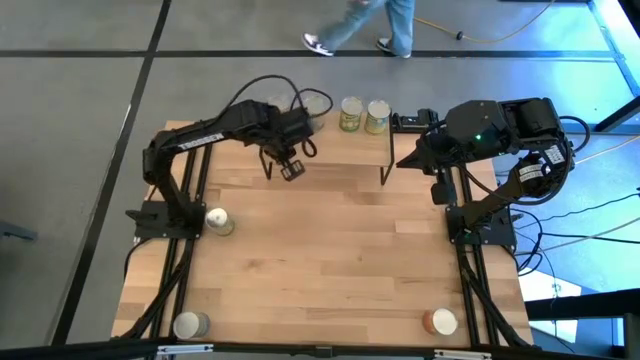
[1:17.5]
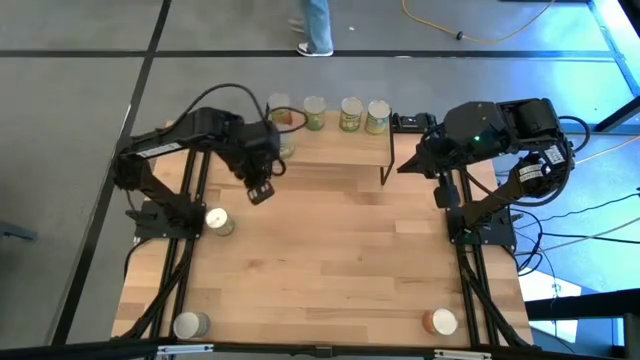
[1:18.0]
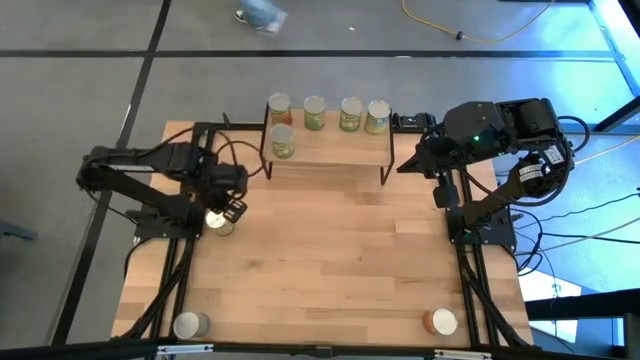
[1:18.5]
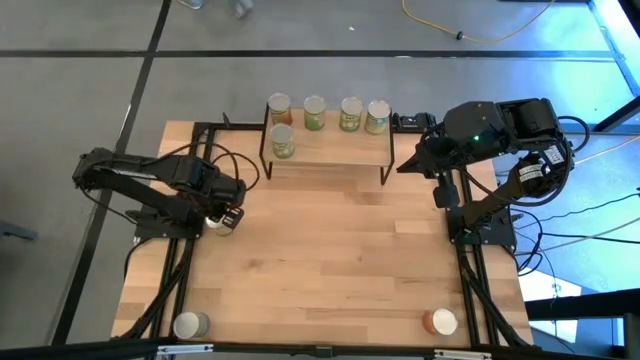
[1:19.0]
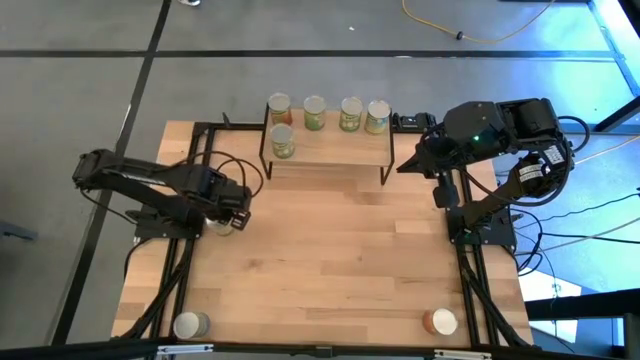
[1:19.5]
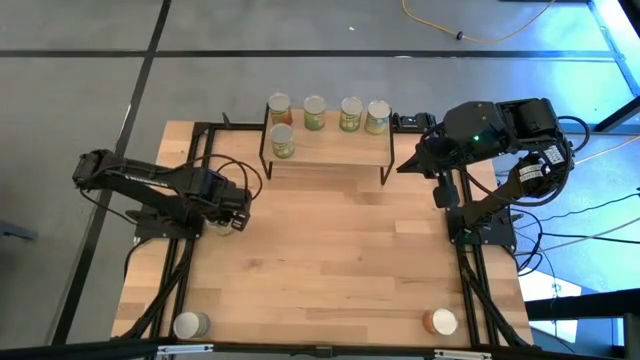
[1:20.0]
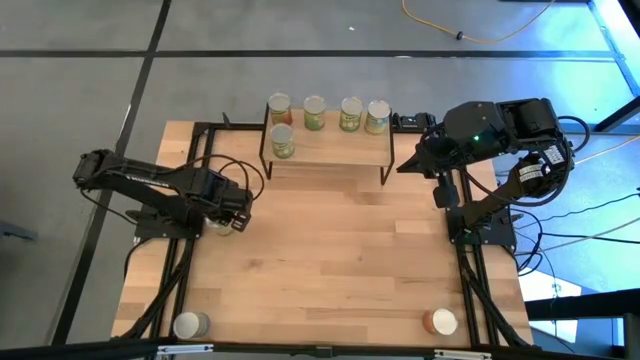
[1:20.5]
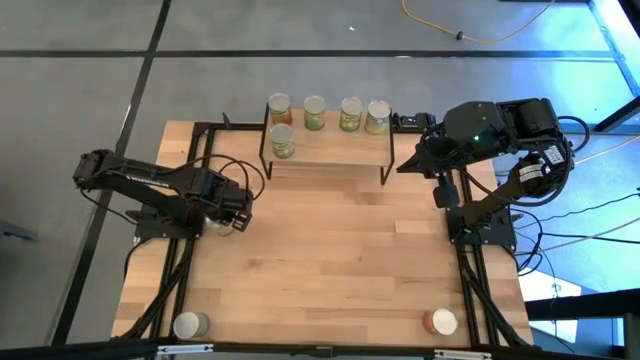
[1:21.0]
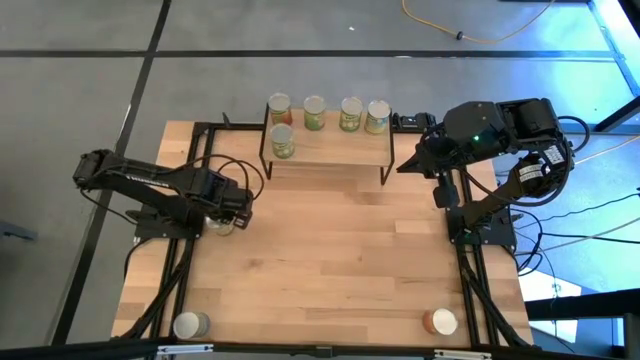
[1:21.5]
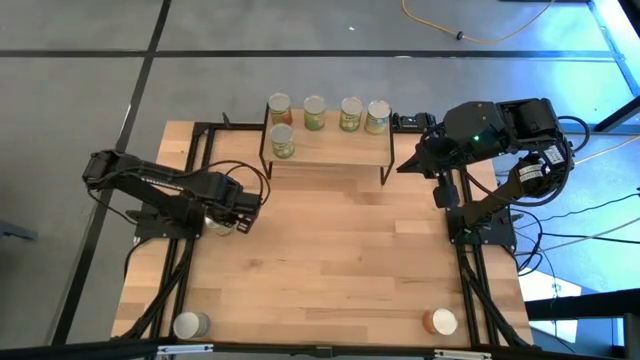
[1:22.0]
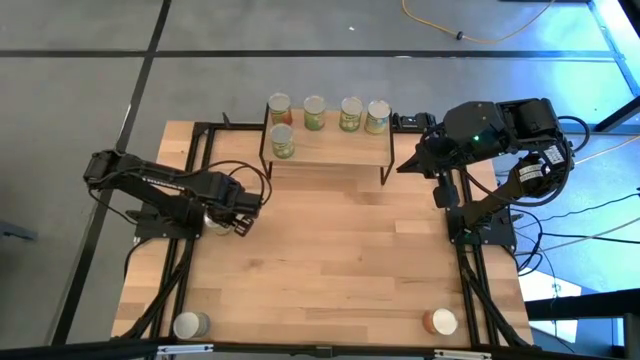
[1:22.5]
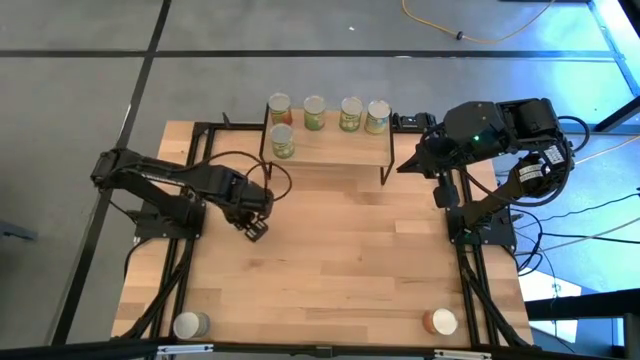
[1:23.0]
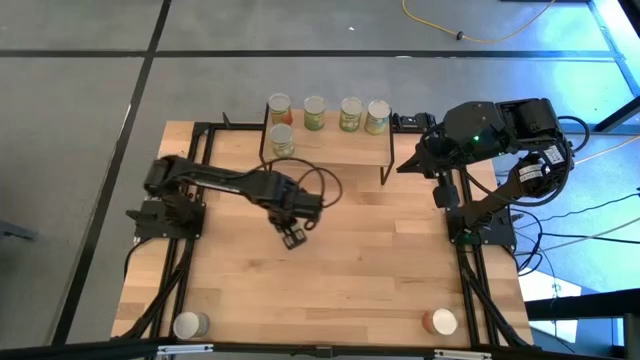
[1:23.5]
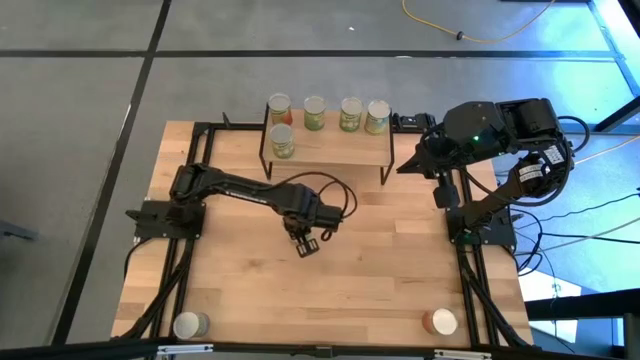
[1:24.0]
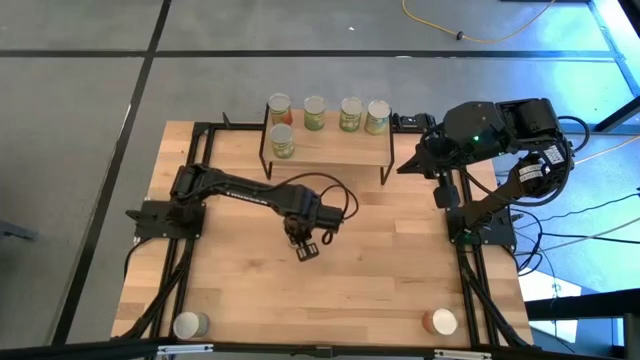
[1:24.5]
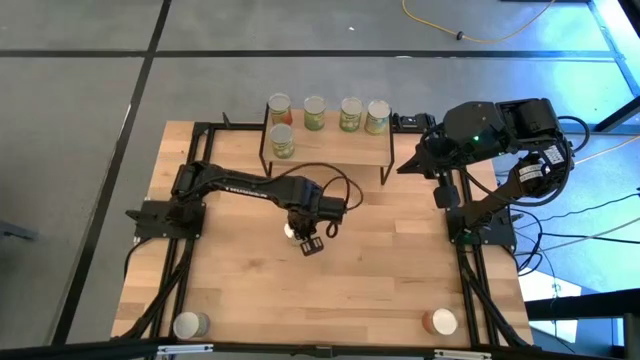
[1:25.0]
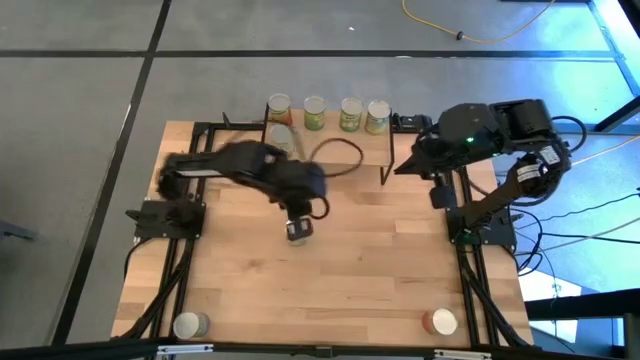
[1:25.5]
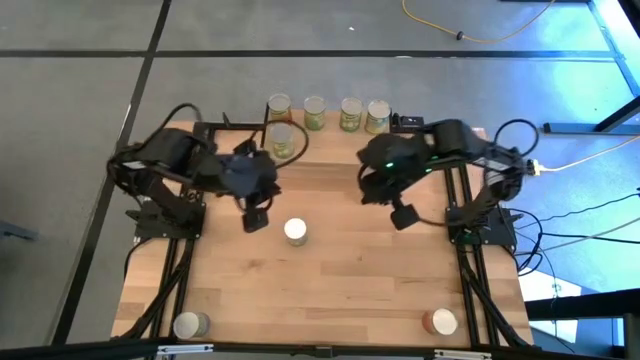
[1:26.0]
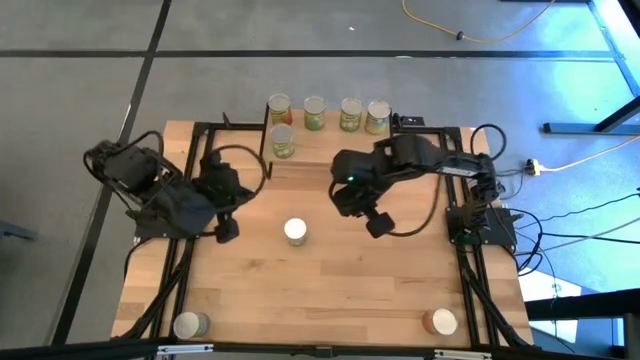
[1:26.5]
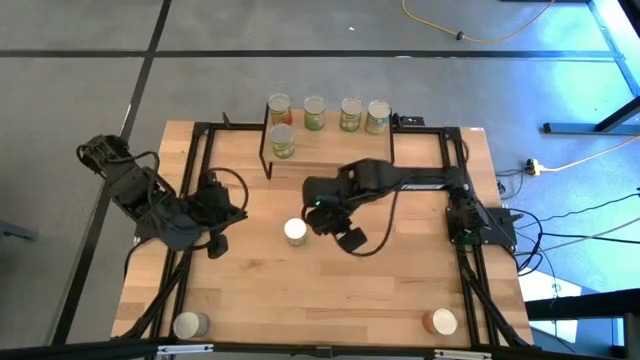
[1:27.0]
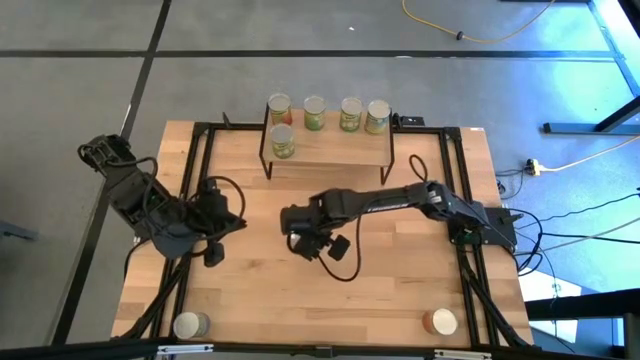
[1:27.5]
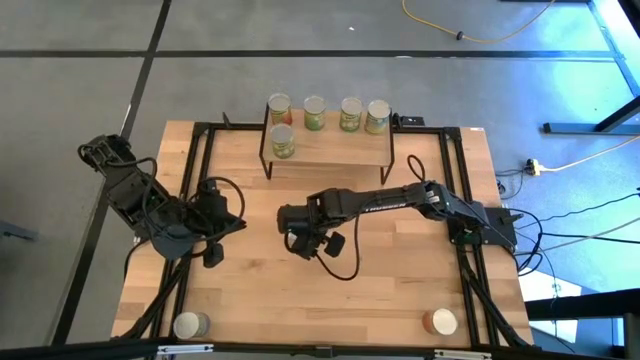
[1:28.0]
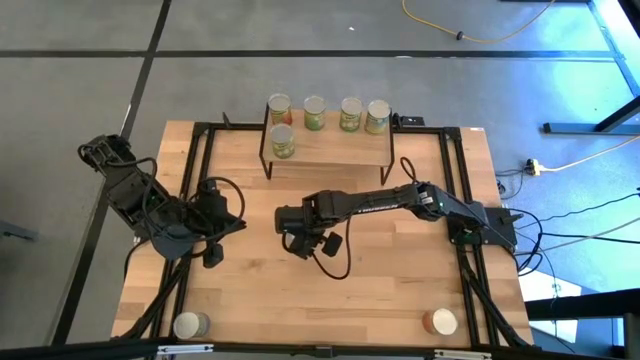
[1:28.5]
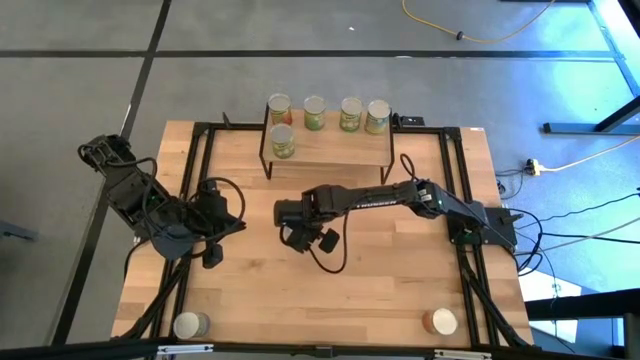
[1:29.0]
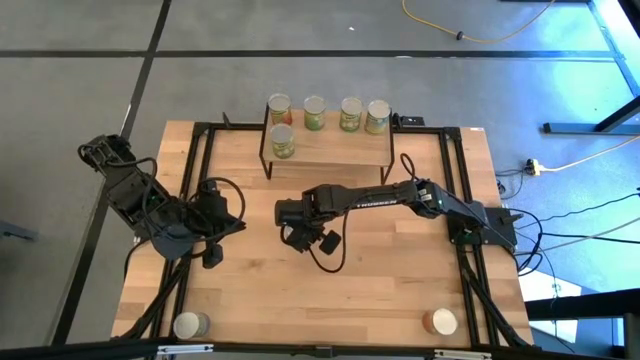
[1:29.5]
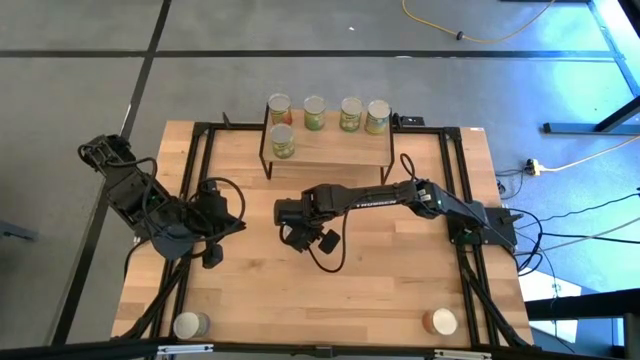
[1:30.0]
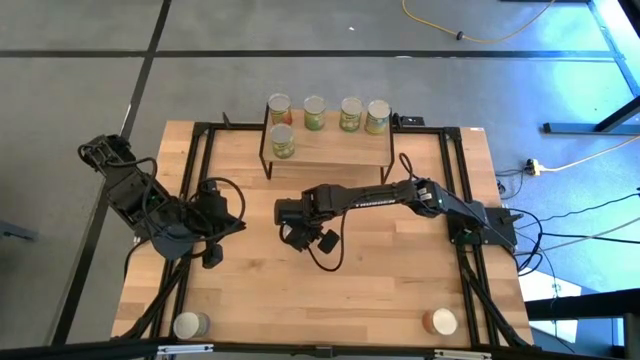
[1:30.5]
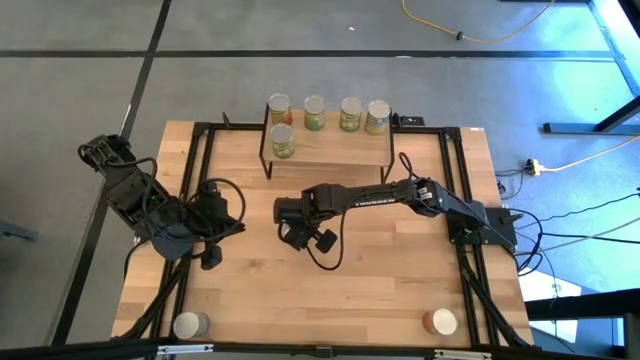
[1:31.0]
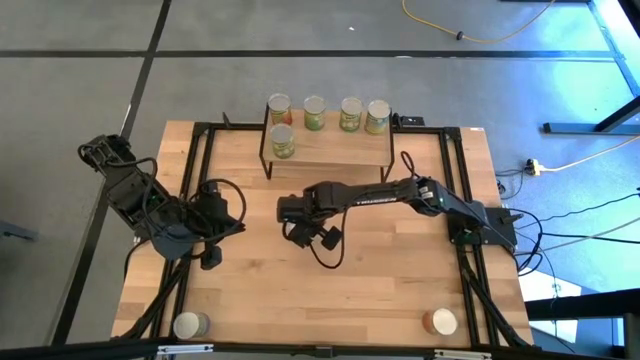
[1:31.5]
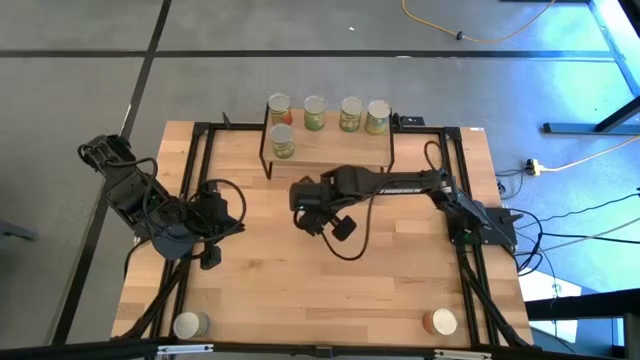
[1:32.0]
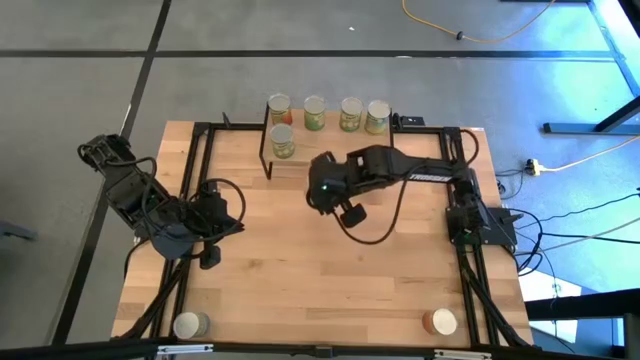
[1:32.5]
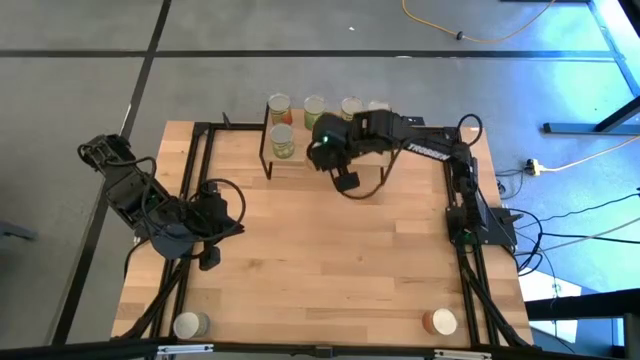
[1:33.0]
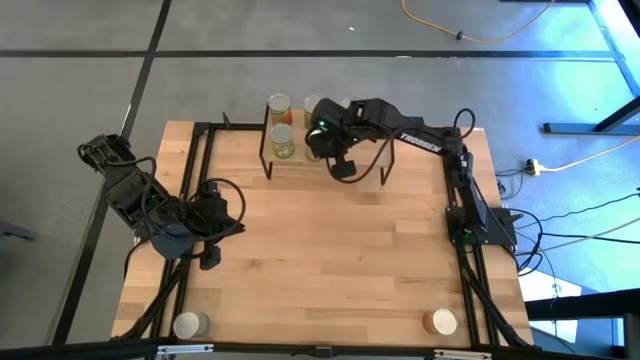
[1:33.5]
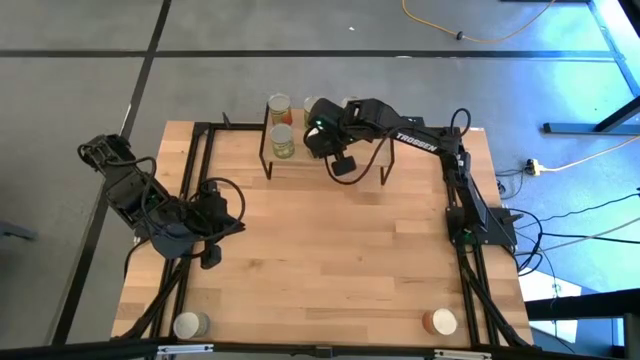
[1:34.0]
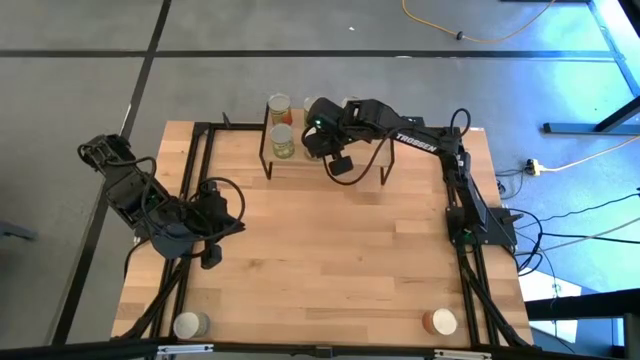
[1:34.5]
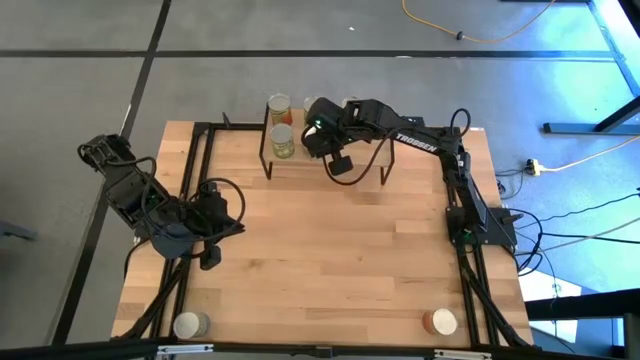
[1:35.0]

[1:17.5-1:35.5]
Task: Pick and place cans onto a shelf
Put the canned oranges on the shelf

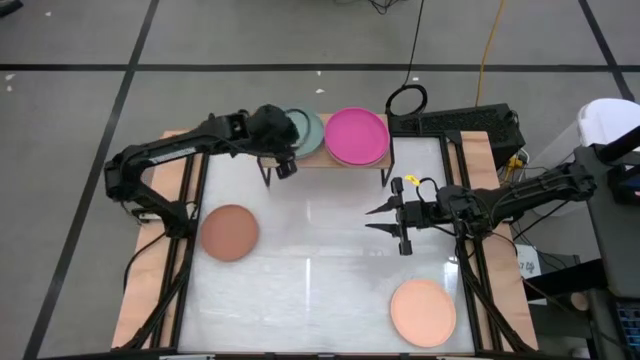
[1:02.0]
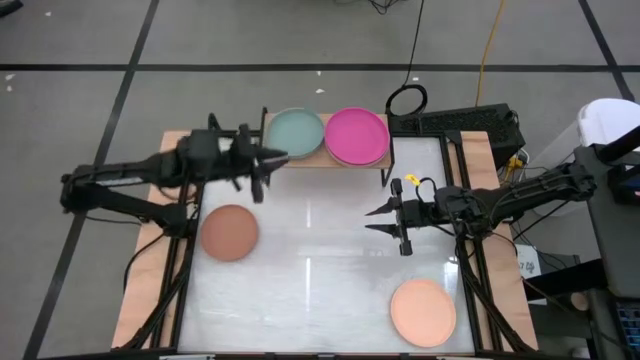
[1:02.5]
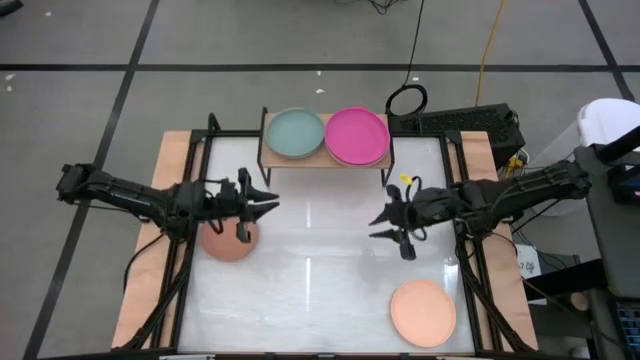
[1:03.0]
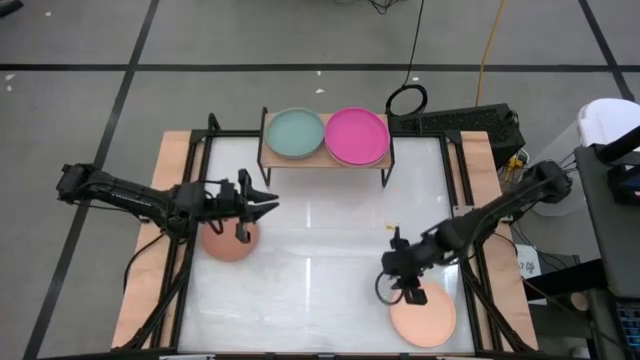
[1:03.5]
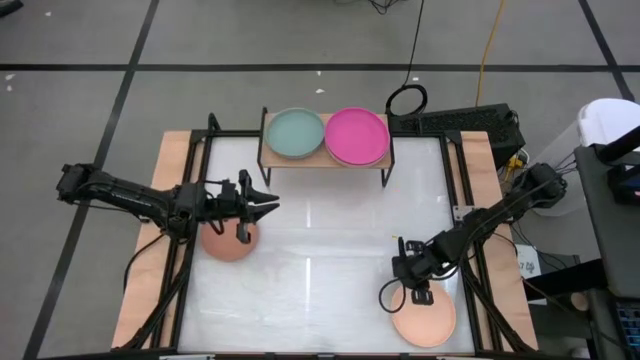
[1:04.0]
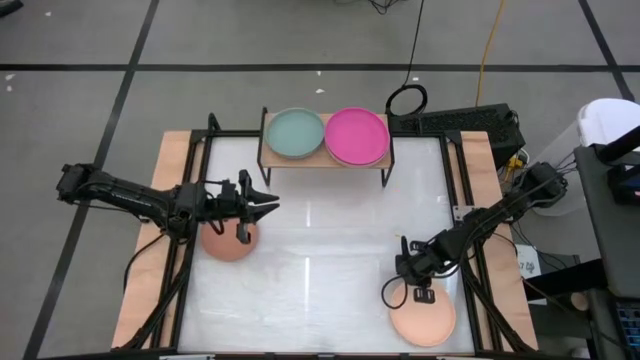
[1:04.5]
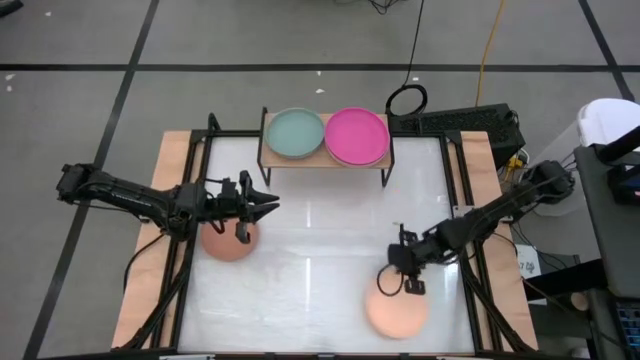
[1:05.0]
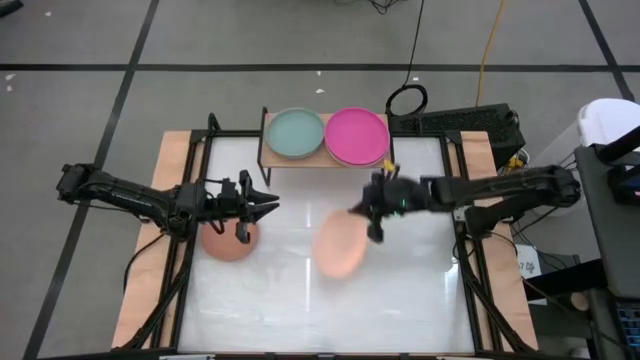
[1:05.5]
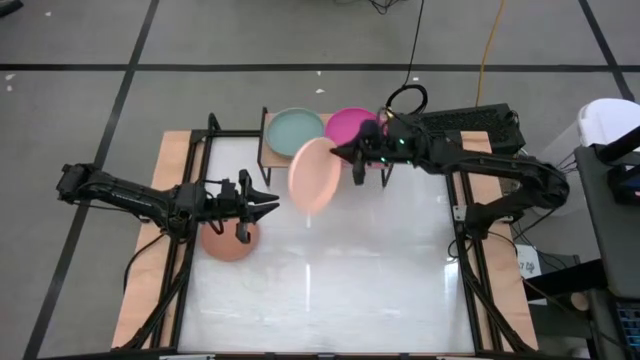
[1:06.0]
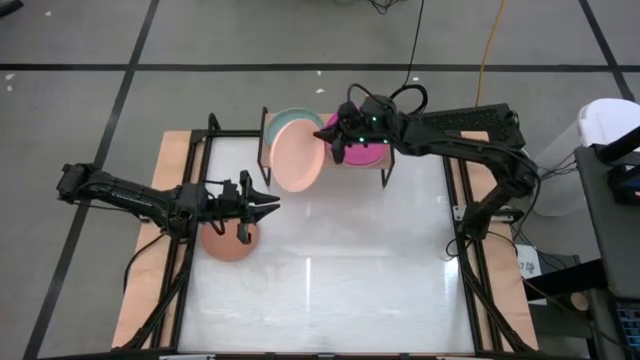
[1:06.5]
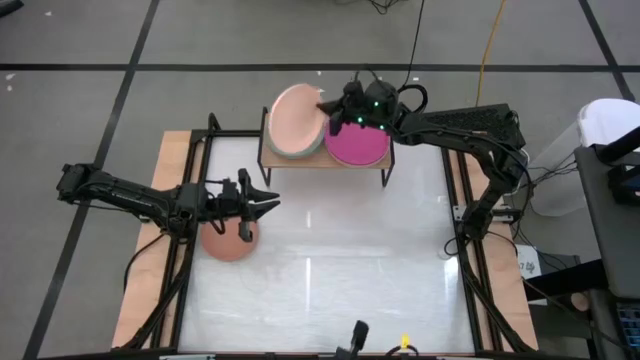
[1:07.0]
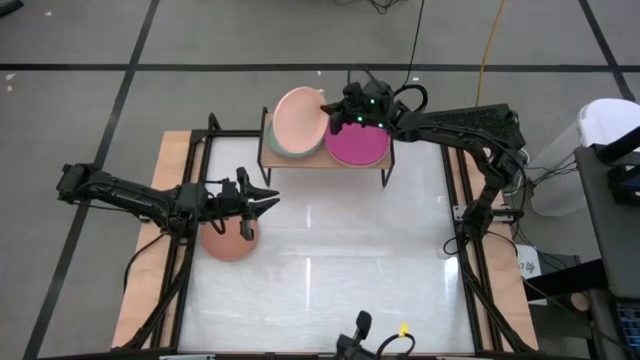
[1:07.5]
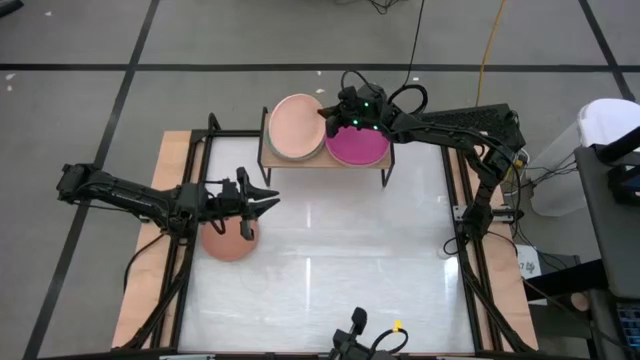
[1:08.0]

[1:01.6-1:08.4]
Task: Place and stack plates onto a shelf
Stack the light orange plate on top of the light green plate on the shelf
